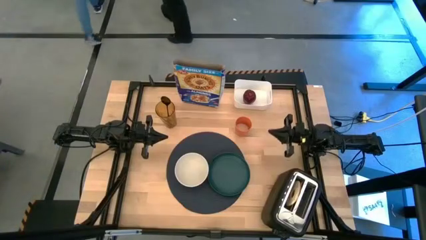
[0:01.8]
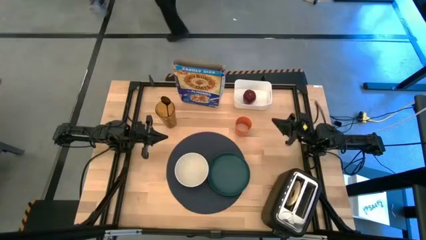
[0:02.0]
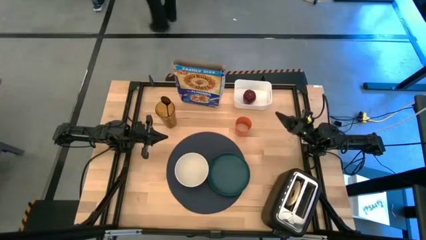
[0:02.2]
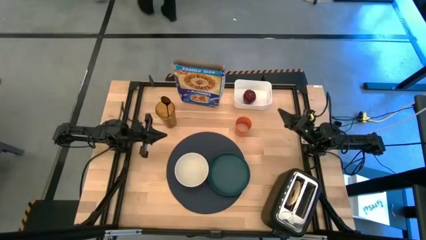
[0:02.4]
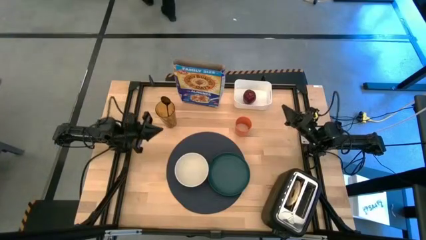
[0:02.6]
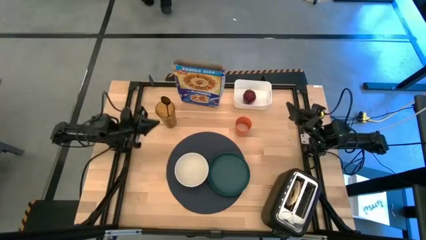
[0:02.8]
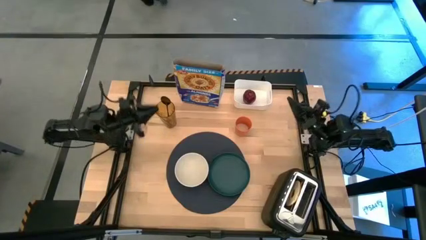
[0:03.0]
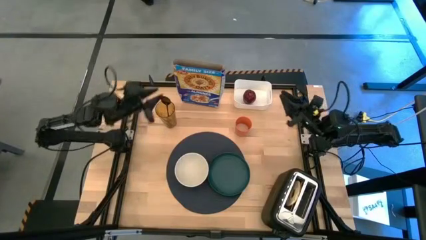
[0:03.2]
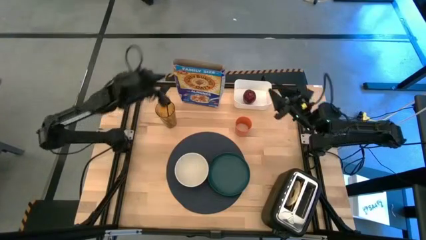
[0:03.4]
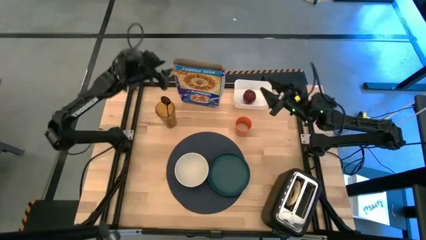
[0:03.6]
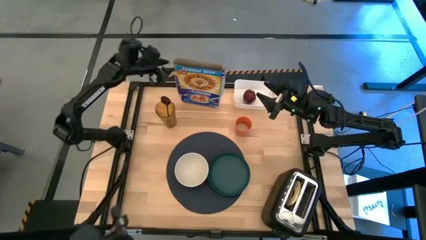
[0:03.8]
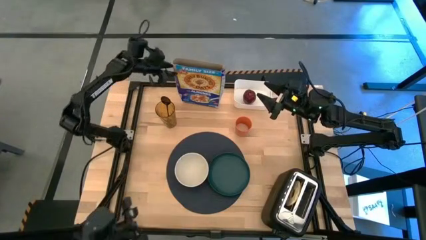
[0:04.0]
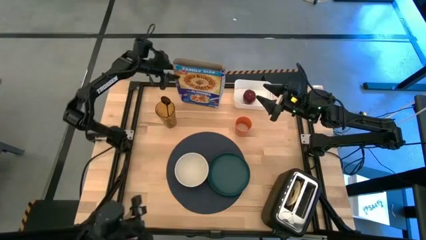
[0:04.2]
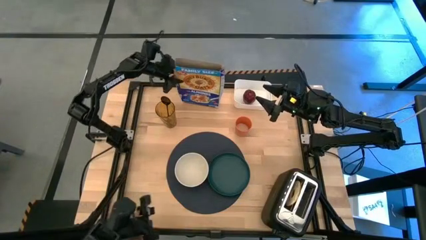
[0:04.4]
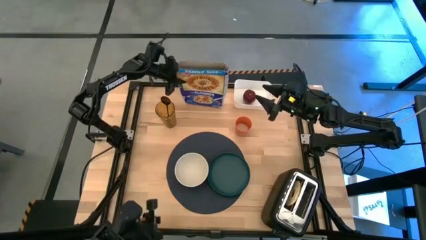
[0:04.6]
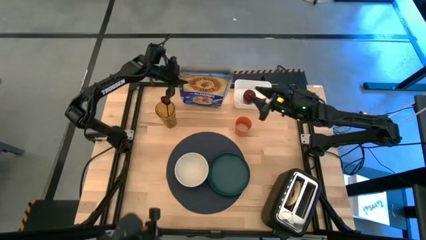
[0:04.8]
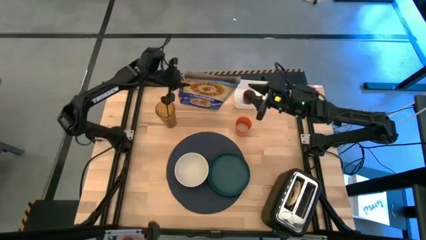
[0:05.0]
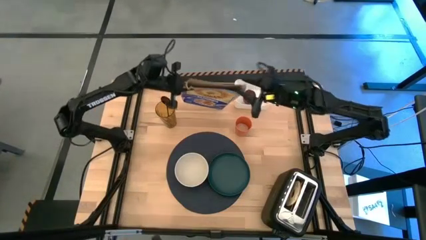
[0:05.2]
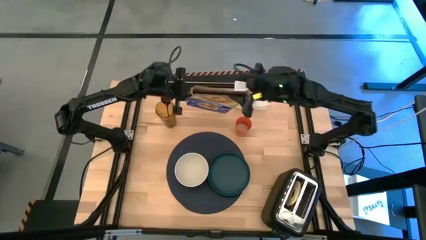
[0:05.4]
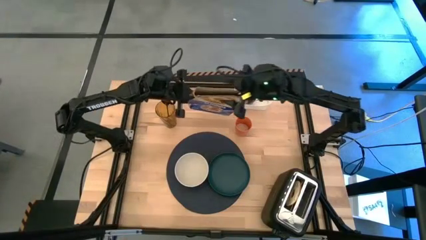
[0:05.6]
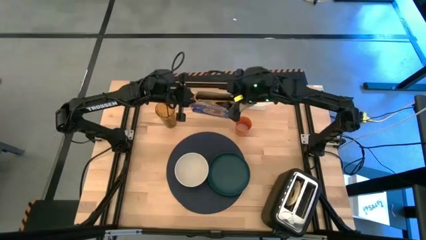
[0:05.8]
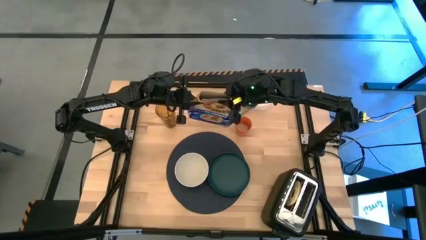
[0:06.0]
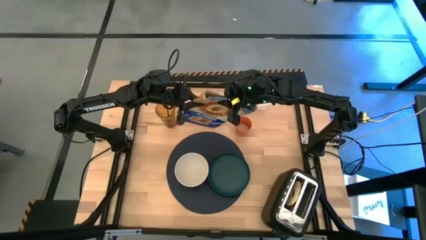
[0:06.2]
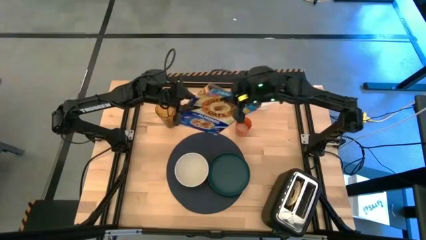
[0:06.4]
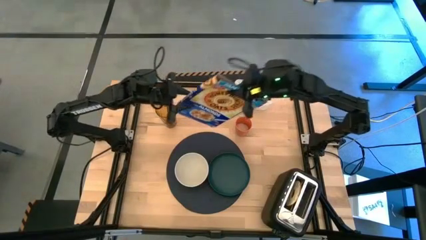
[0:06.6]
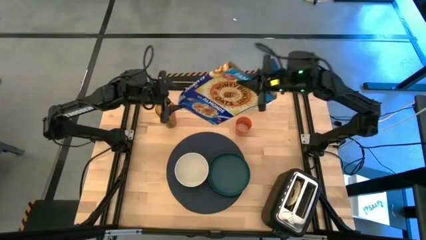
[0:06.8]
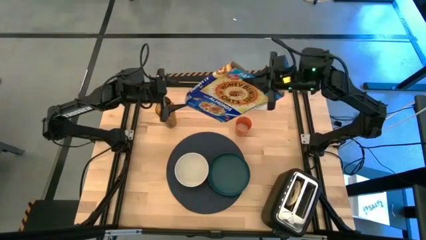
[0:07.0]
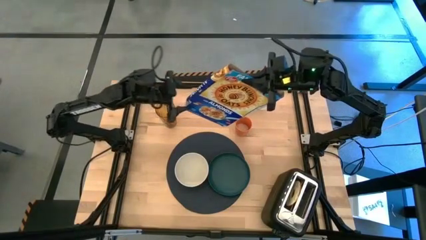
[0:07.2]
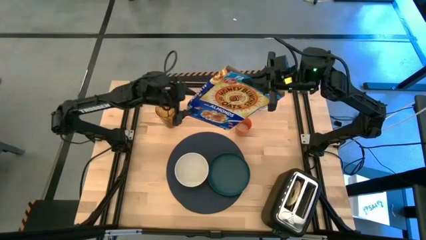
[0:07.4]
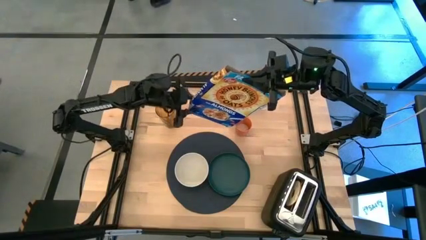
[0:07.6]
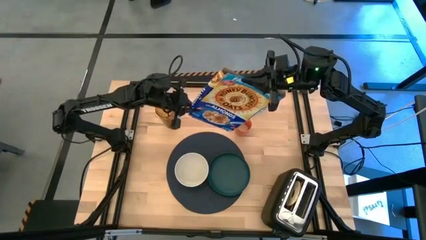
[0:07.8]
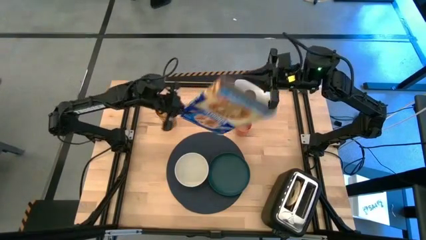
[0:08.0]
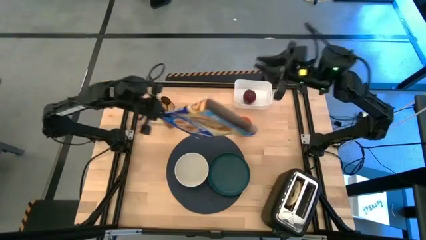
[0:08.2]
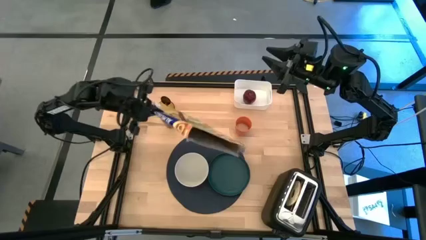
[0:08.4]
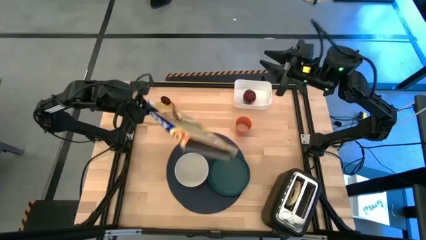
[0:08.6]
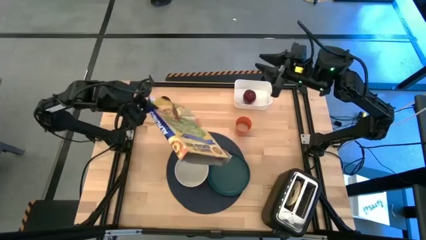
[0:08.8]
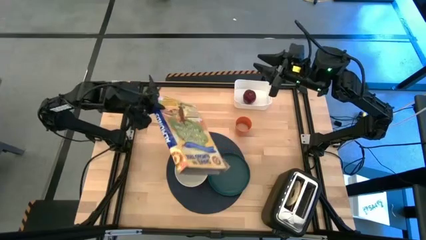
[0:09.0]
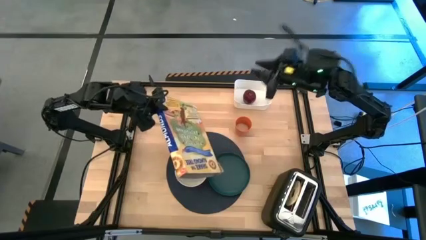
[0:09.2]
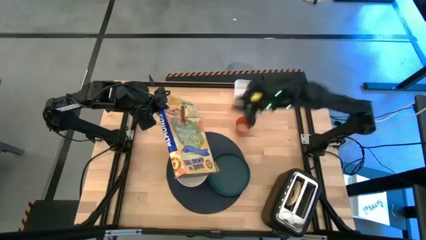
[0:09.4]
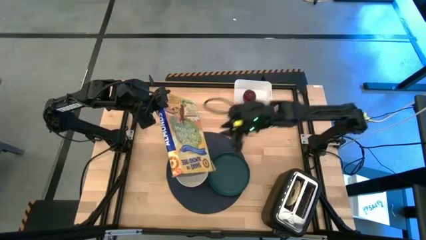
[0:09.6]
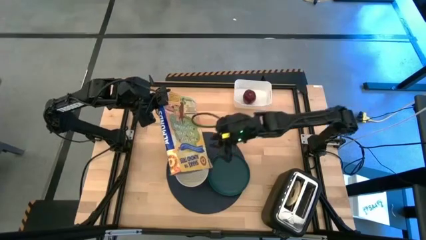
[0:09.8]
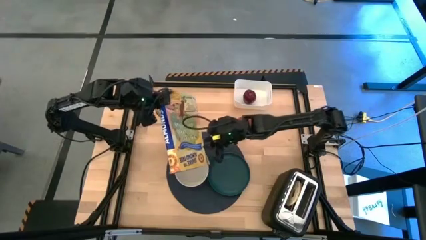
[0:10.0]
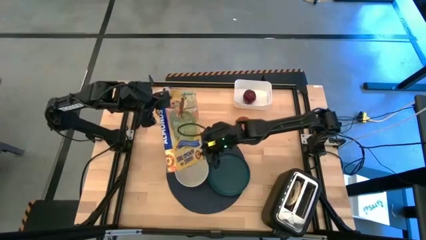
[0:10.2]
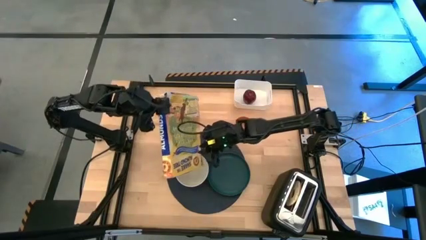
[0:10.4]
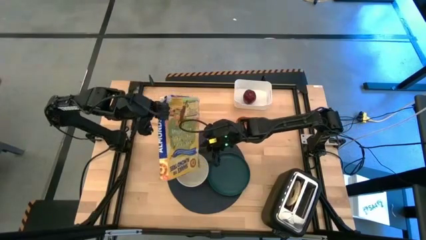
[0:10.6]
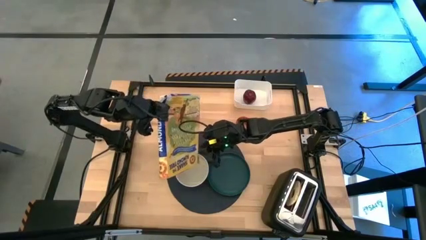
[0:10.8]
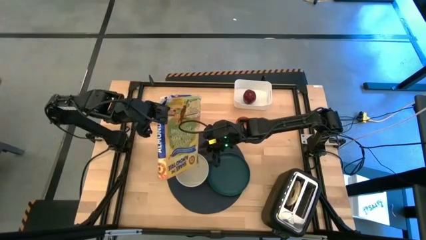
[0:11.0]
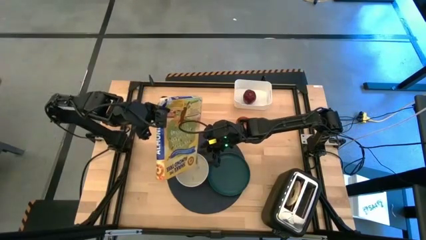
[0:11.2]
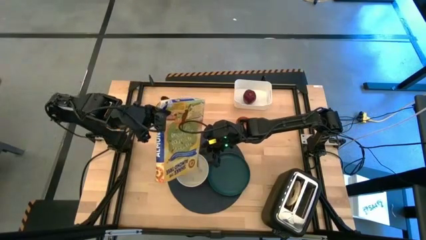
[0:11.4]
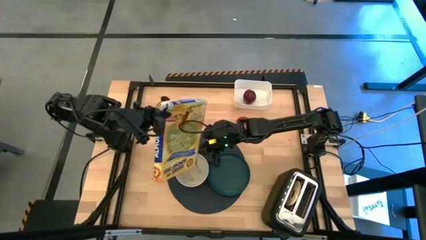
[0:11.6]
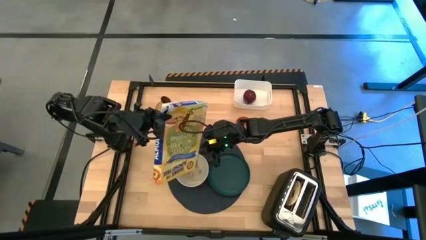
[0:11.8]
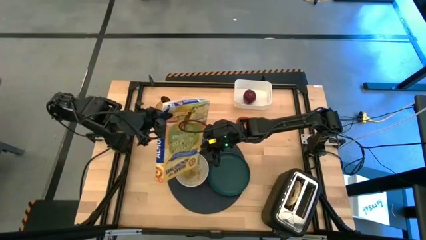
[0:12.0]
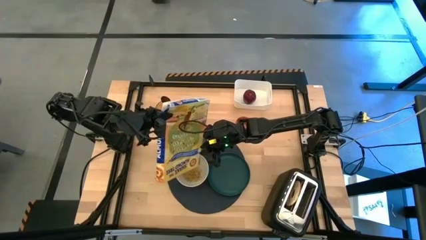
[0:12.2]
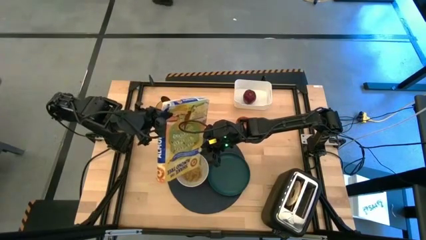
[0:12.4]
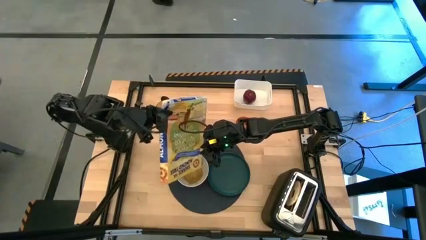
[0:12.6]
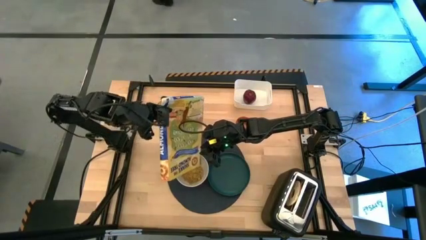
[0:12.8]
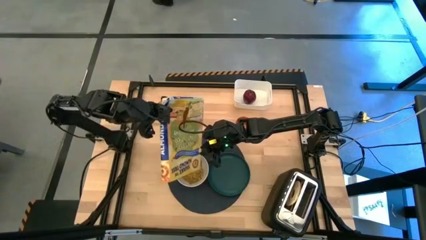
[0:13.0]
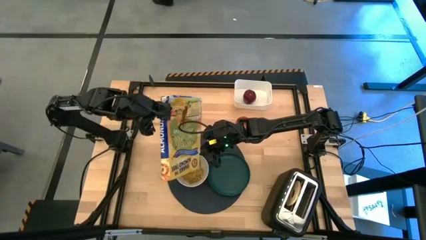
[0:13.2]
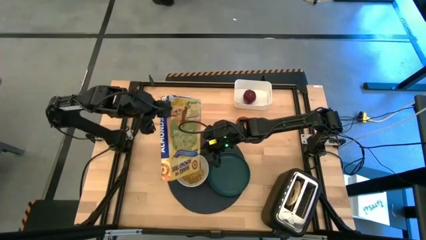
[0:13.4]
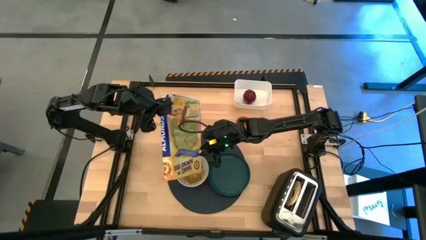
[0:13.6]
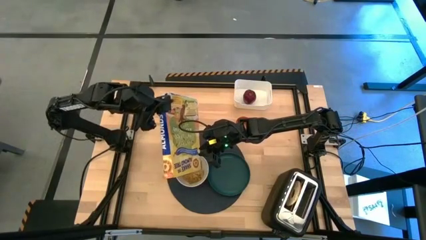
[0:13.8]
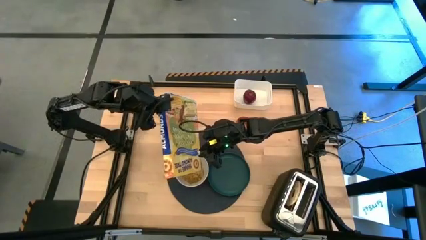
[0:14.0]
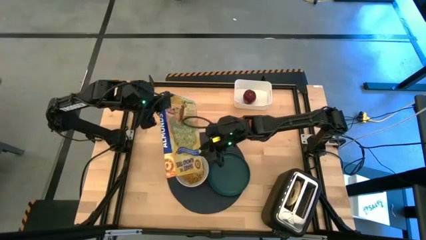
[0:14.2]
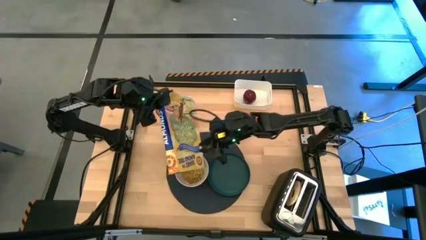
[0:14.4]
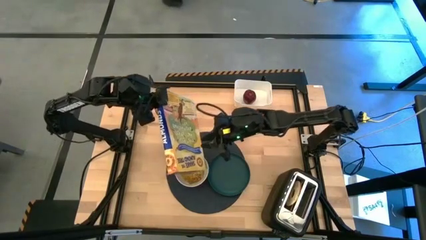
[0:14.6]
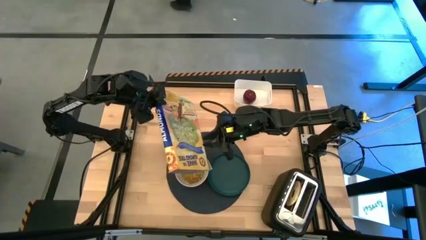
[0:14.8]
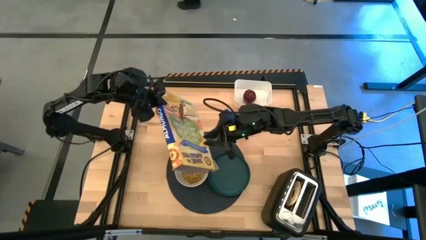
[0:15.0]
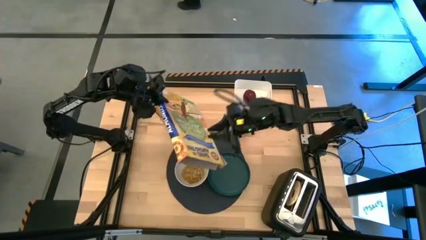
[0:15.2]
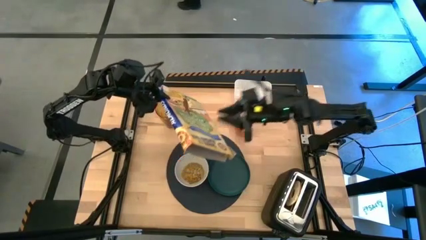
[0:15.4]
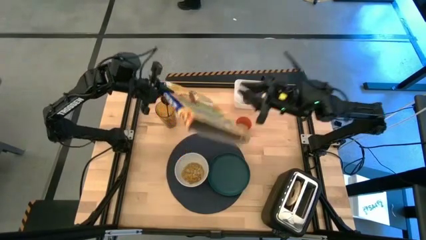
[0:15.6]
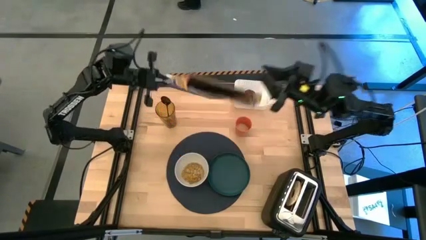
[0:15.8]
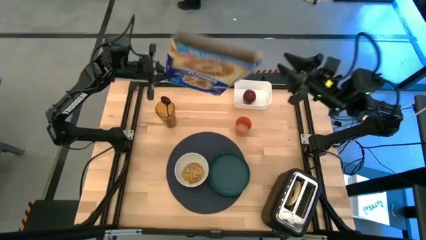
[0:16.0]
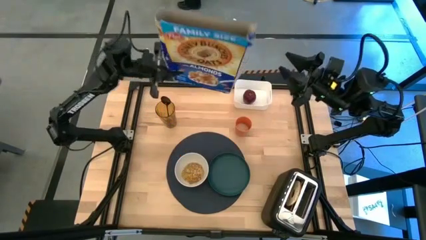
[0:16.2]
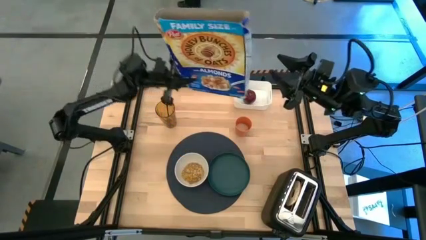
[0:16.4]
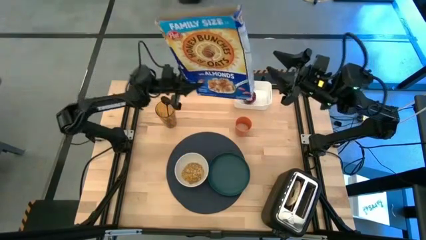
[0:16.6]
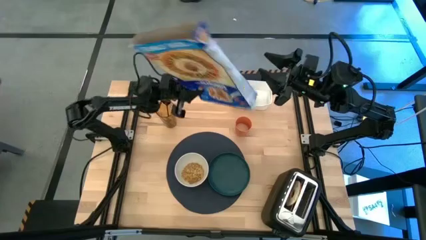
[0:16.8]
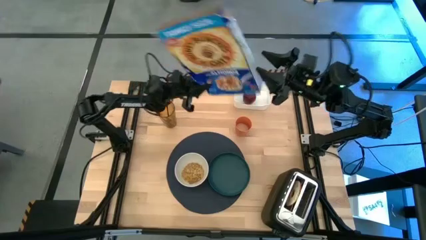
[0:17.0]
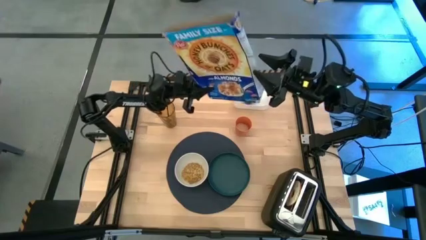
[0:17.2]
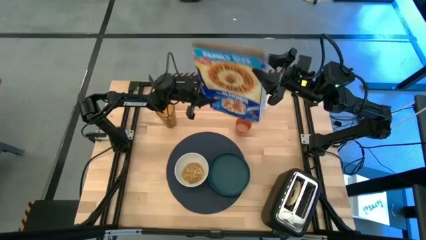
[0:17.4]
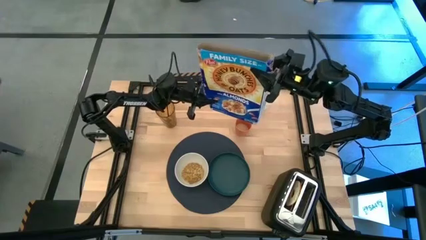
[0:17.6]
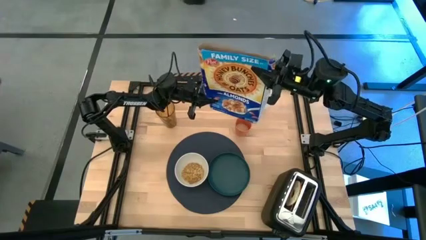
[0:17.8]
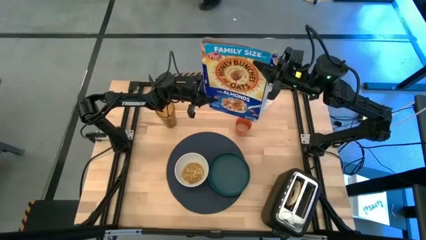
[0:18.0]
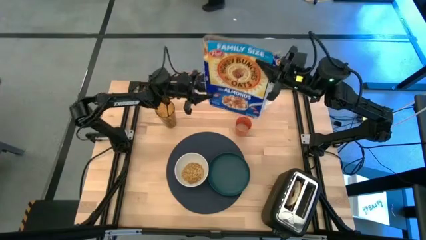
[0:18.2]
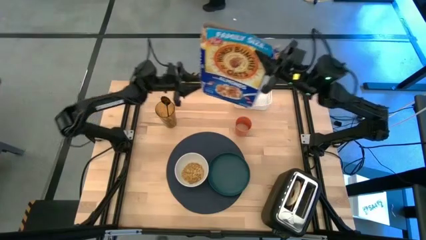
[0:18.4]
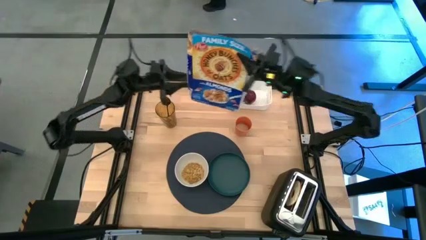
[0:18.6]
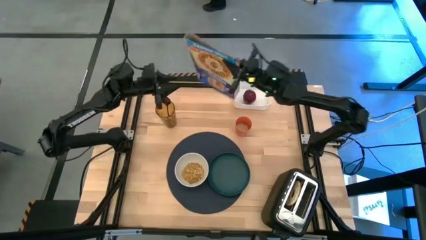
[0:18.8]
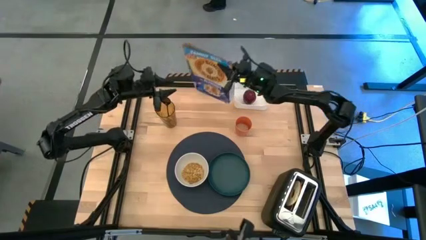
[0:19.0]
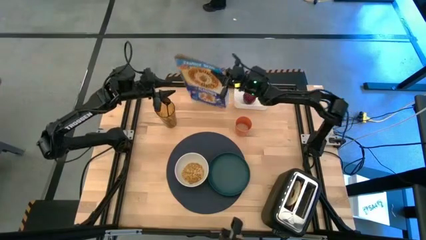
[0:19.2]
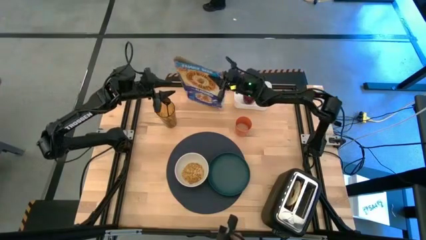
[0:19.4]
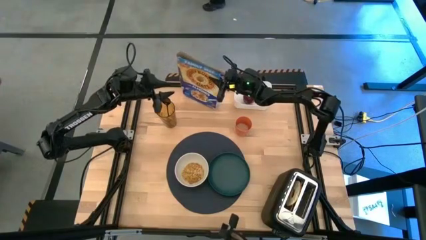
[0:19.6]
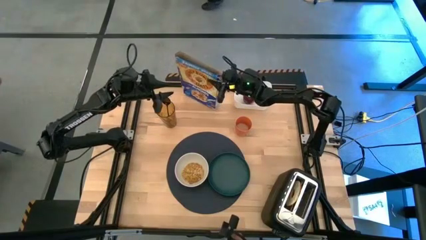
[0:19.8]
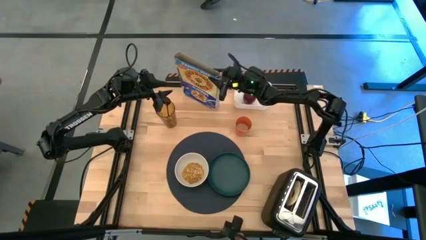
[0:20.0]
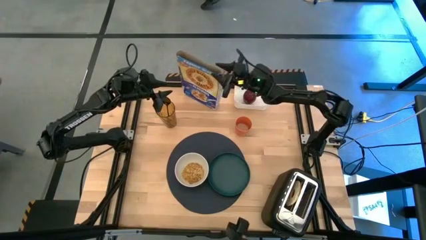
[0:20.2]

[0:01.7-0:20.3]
Task: Arrange a breakfast setting
Pour the cereal from the cereal box into the white bowl
